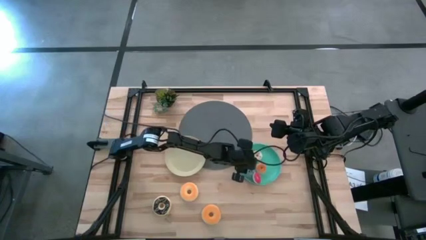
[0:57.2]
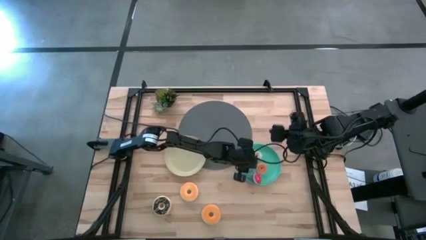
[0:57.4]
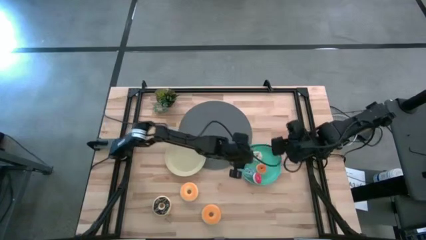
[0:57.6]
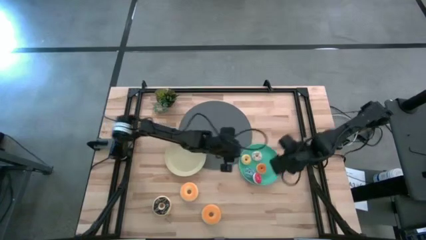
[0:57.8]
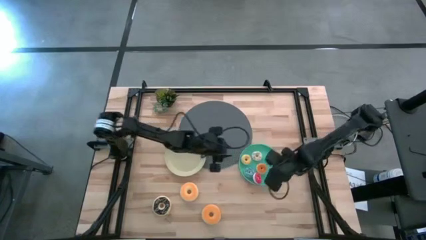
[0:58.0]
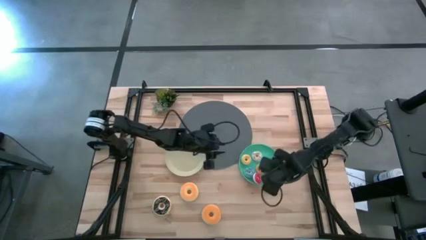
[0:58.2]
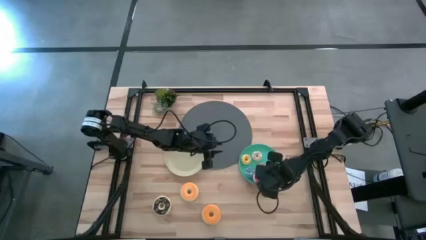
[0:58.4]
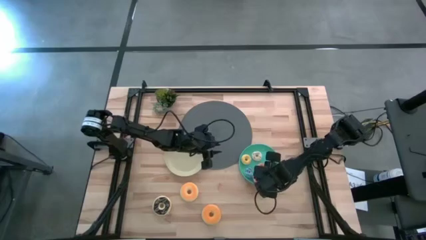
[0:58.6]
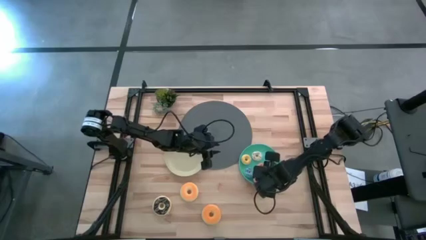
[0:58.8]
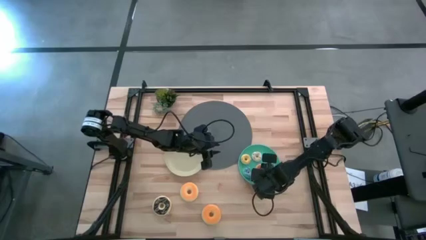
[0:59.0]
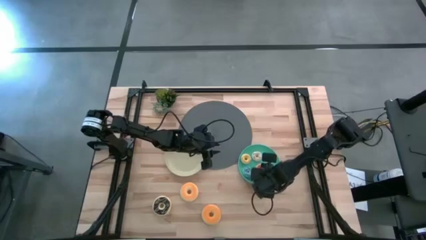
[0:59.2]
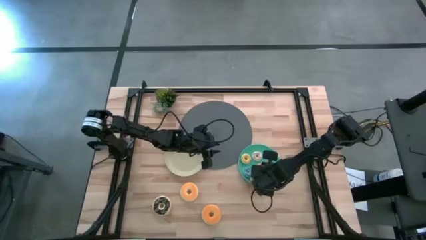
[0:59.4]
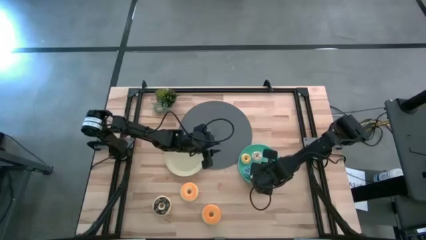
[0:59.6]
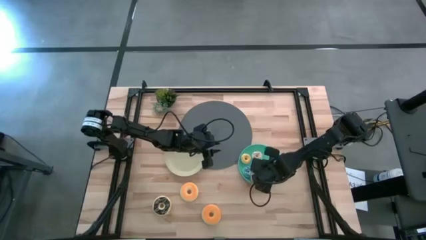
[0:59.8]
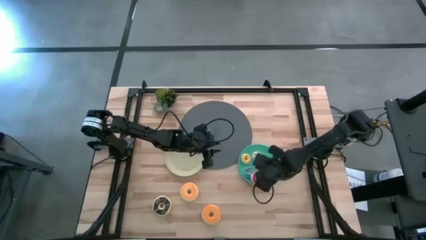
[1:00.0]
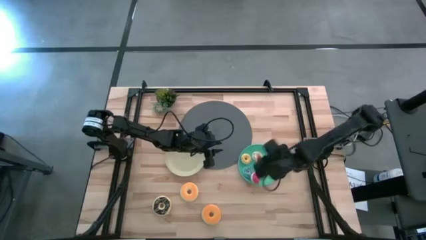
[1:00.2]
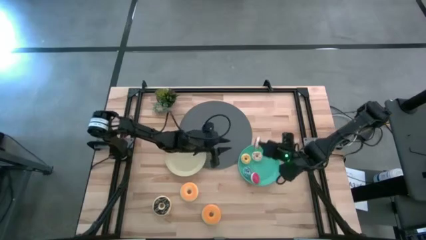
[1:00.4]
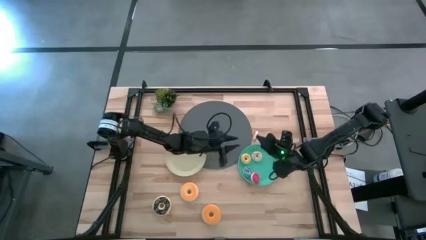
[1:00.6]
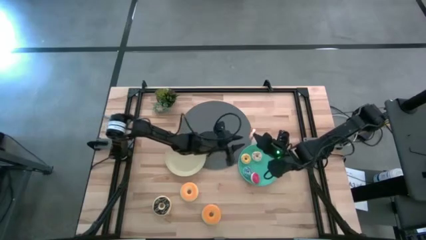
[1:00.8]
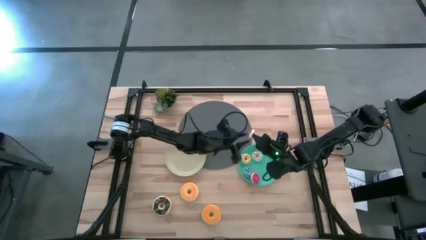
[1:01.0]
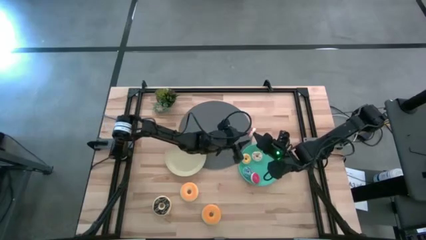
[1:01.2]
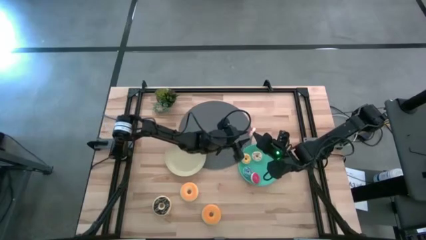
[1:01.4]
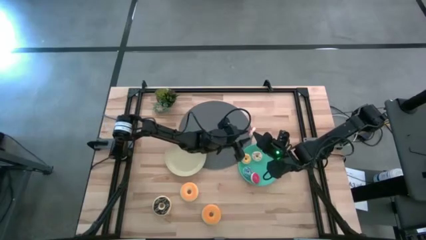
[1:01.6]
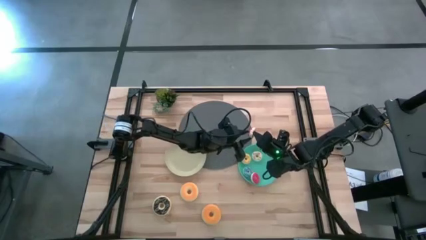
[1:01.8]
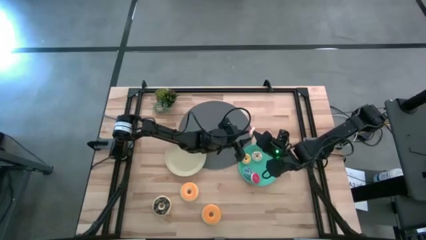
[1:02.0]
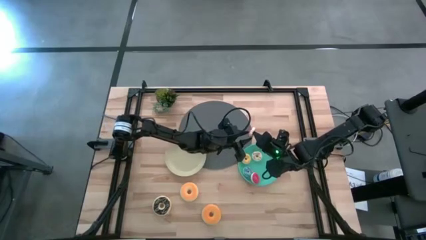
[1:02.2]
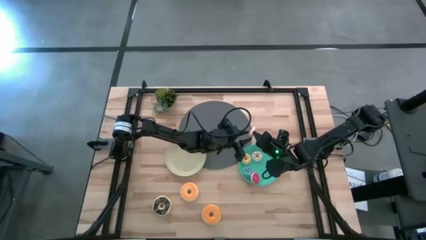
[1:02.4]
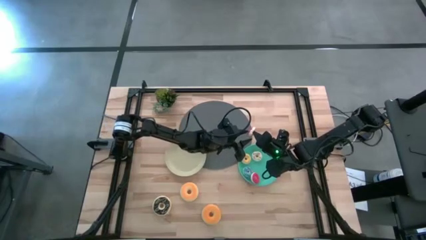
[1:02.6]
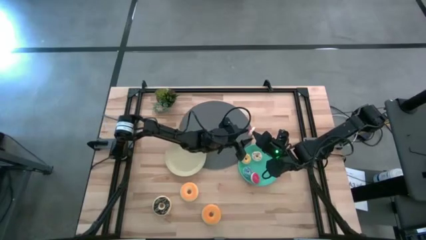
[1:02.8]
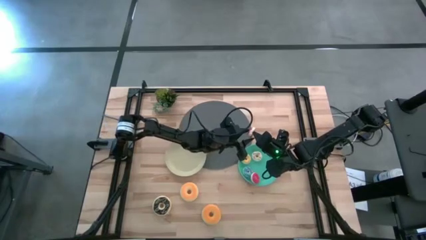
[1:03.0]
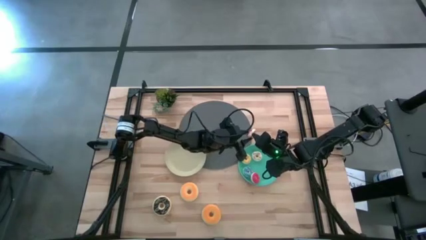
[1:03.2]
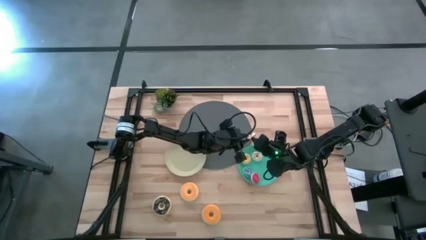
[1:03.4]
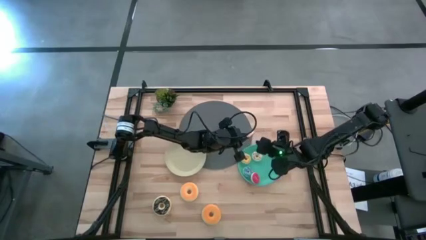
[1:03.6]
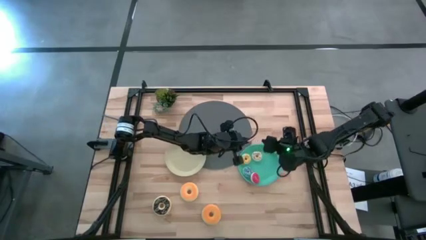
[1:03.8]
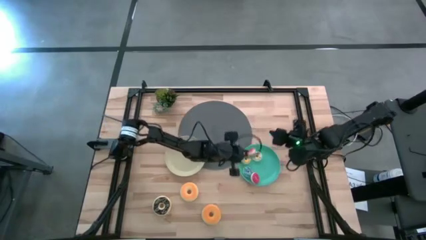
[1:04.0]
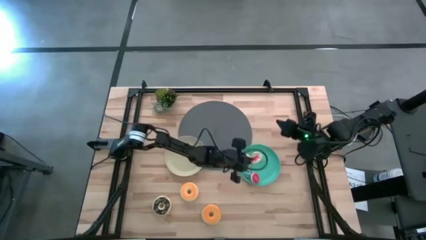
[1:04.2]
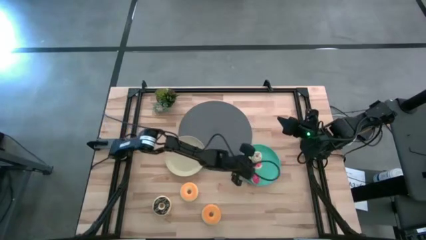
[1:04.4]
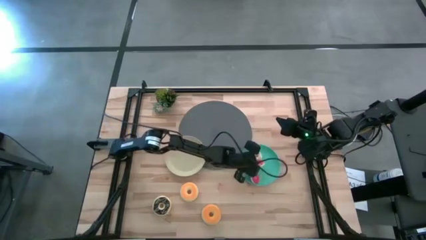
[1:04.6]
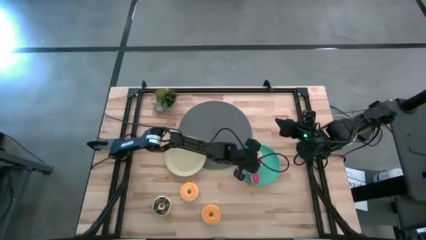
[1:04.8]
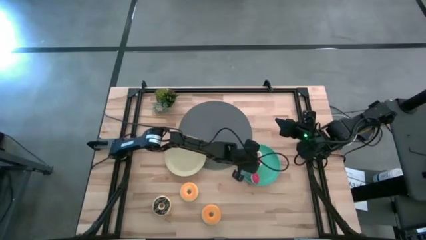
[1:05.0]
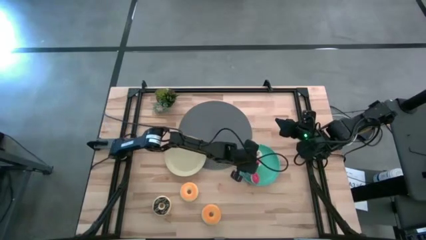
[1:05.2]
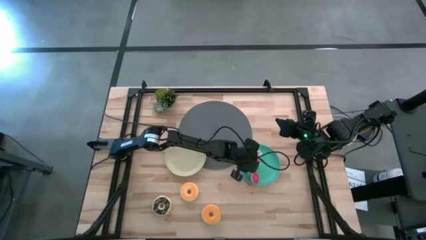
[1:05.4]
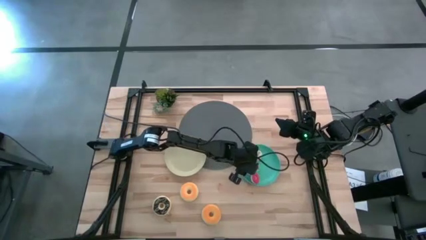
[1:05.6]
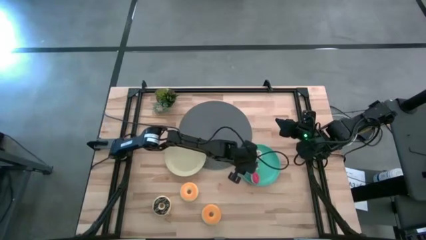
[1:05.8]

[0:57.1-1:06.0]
Task: Pick & Place donuts
Put the small orange donut on the green plate

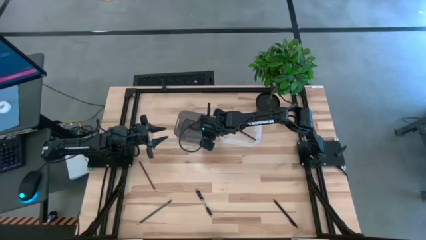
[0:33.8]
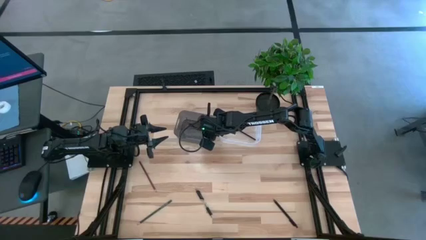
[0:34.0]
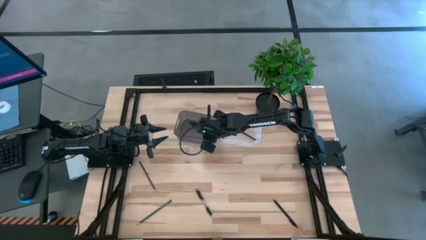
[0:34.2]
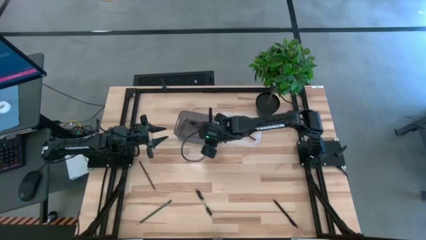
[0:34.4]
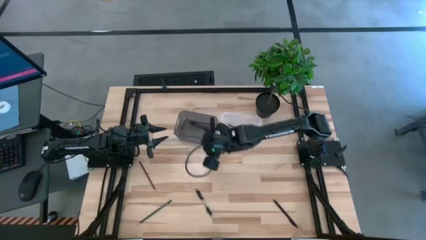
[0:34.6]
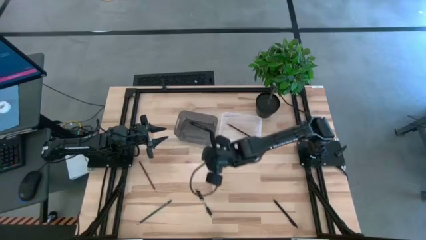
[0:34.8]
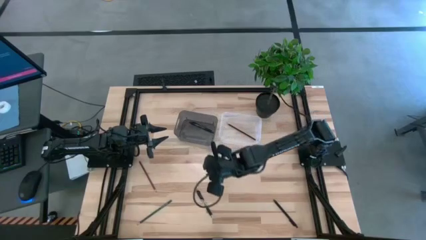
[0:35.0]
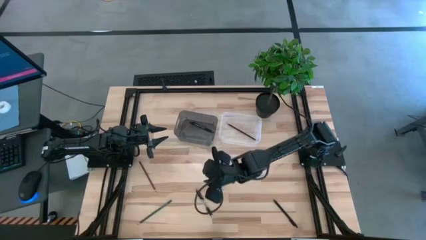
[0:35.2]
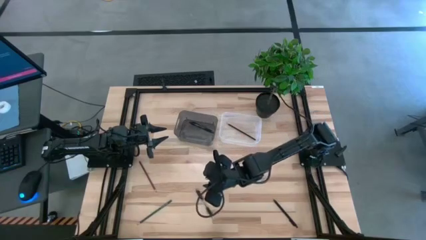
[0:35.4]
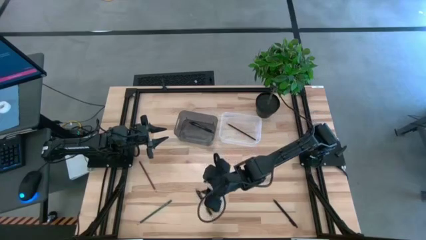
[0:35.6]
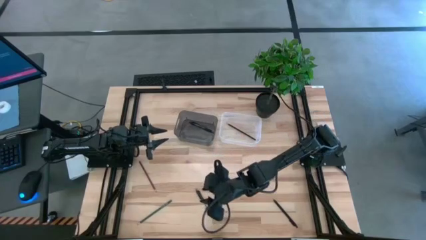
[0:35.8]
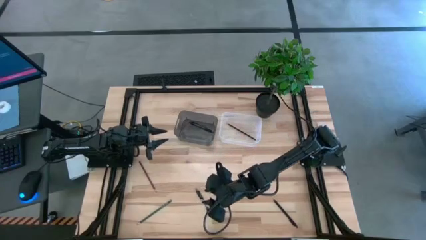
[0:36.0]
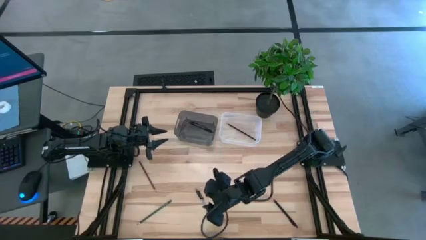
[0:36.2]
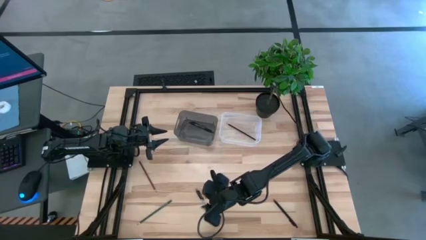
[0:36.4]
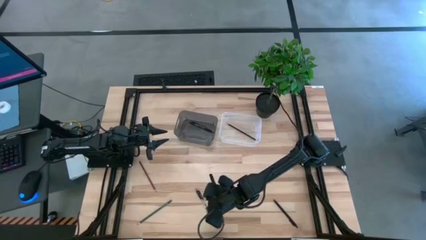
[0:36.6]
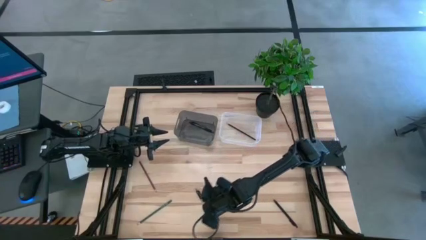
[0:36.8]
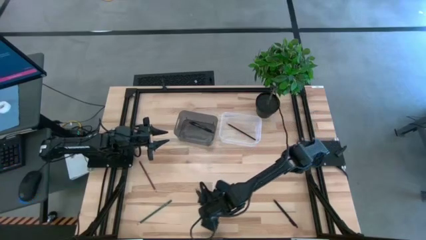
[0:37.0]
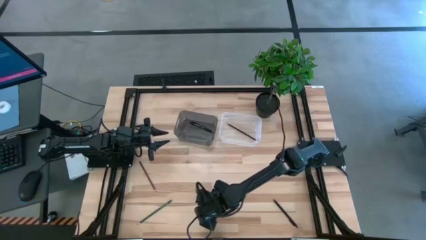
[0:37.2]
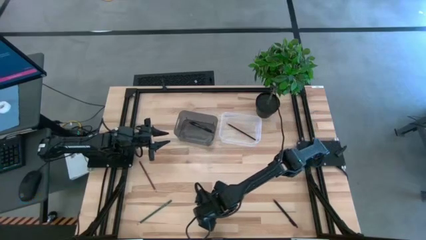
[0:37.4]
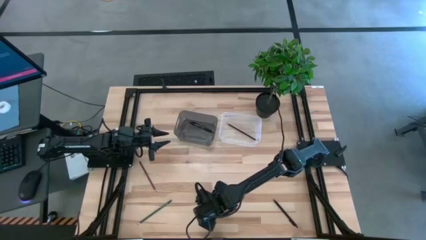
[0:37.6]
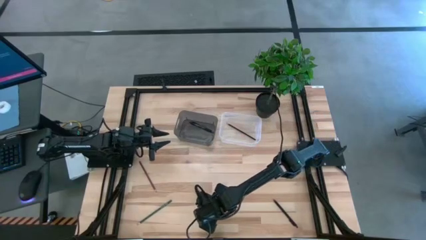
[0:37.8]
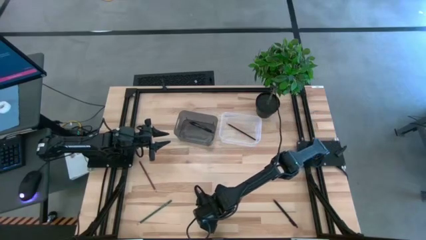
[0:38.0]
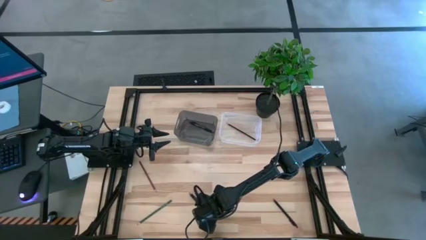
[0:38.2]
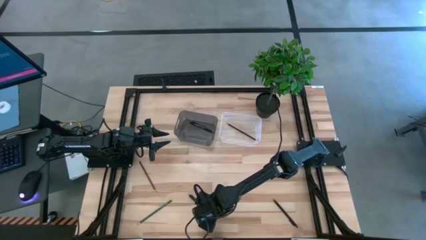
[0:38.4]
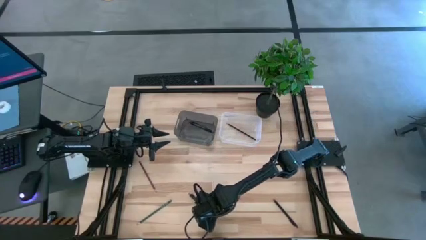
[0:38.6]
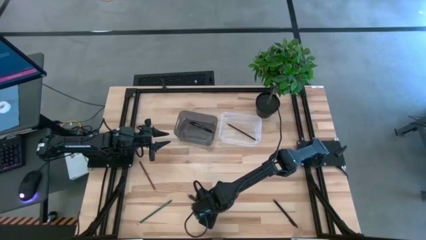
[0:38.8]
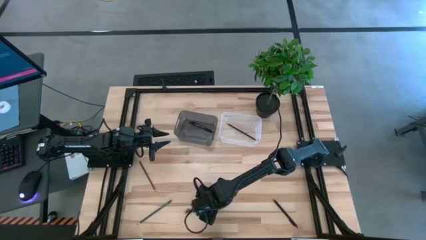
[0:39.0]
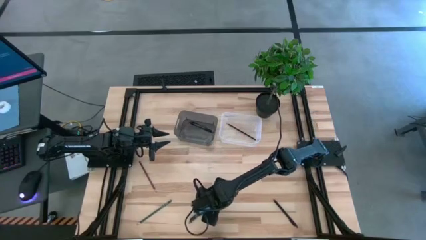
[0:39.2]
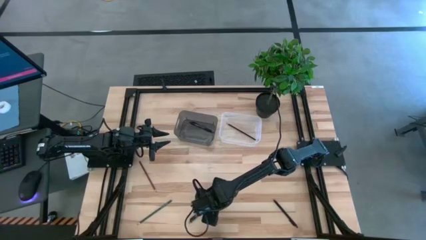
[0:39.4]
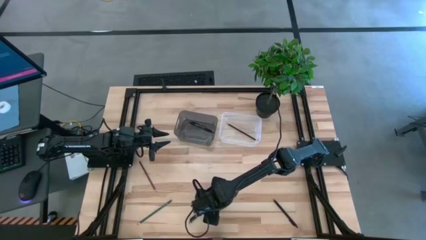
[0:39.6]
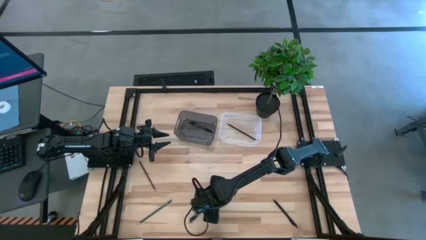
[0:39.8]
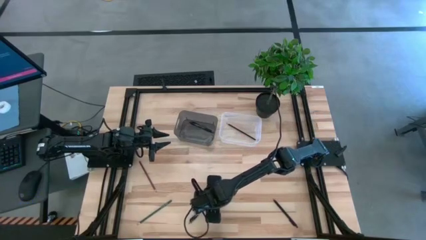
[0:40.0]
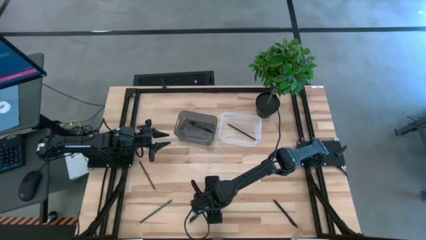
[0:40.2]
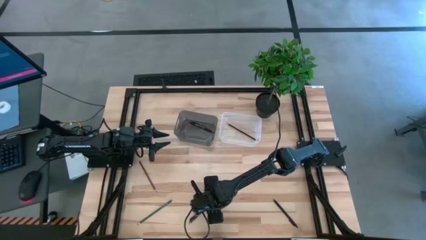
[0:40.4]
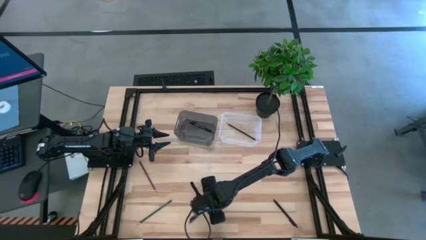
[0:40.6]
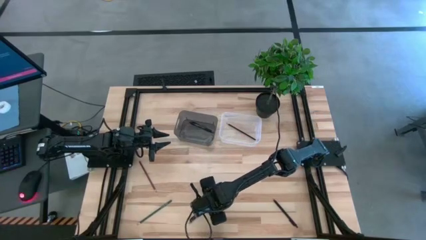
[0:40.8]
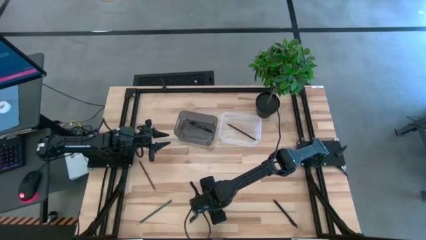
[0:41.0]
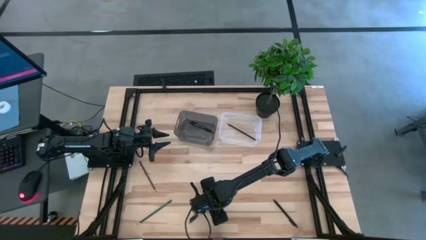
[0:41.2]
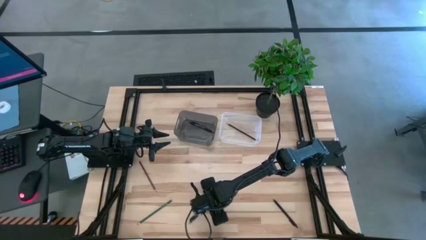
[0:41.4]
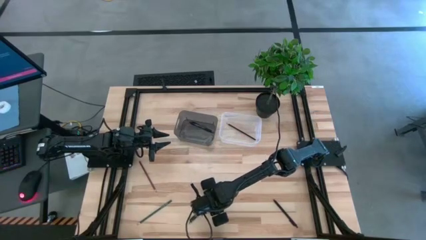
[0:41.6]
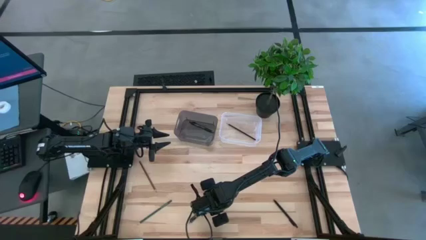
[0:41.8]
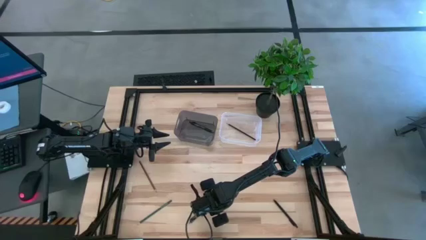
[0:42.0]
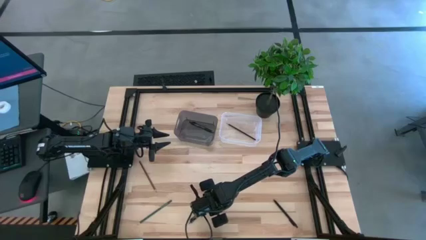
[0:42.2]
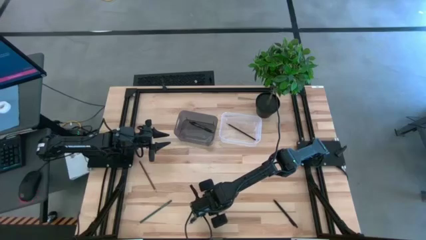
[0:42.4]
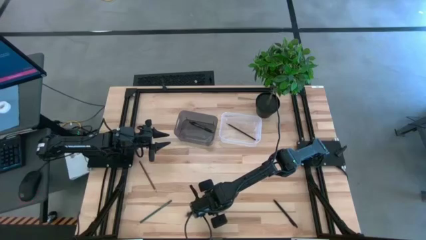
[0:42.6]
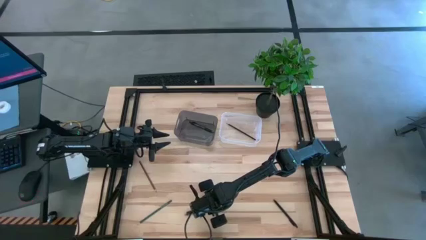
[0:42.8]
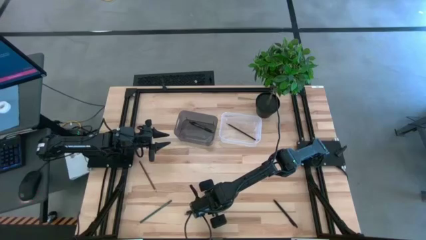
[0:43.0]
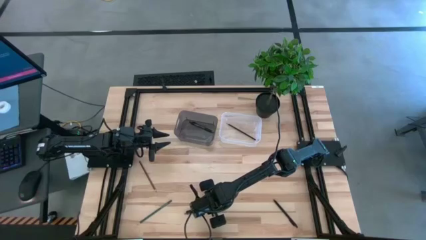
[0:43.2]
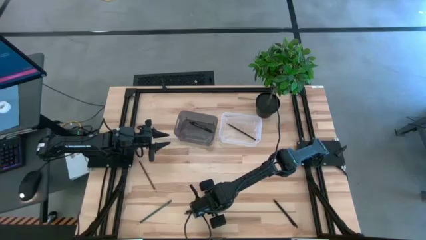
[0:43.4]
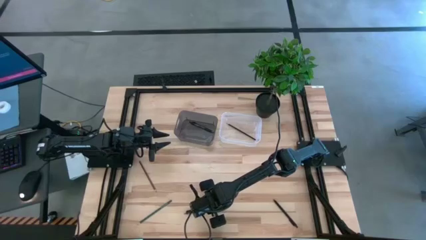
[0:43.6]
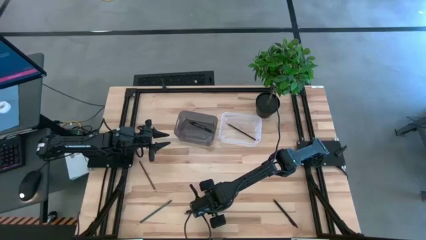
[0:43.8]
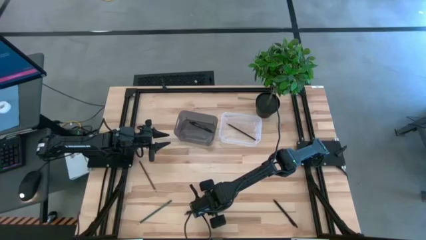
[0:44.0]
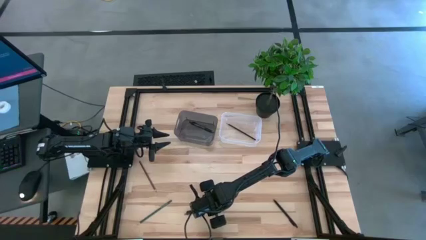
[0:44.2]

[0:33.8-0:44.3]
Task: Sort pens & pencils
Put the left black pen into the black bin
